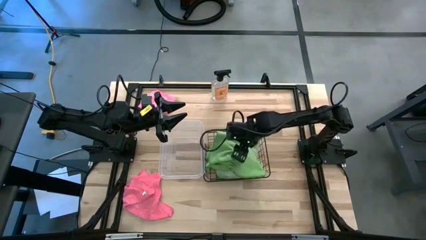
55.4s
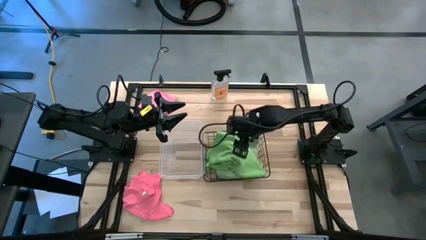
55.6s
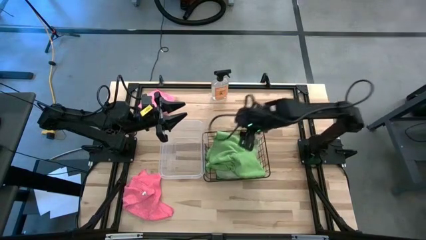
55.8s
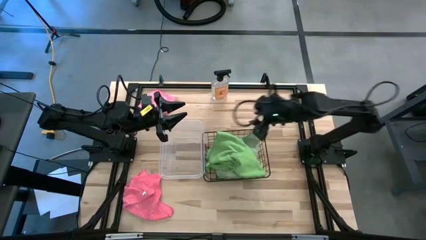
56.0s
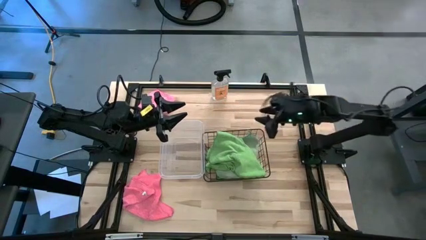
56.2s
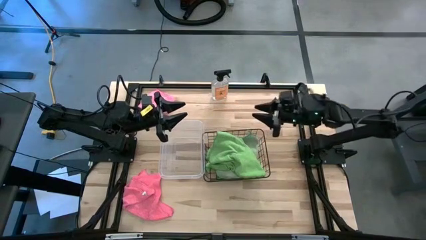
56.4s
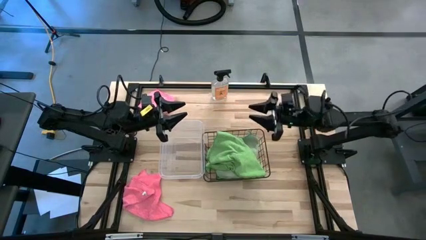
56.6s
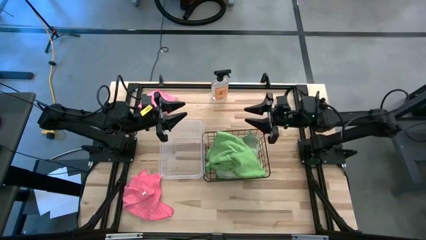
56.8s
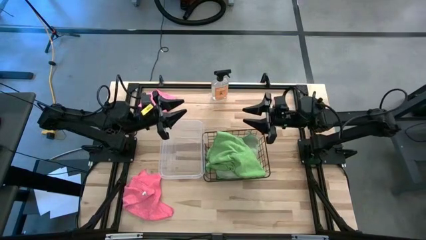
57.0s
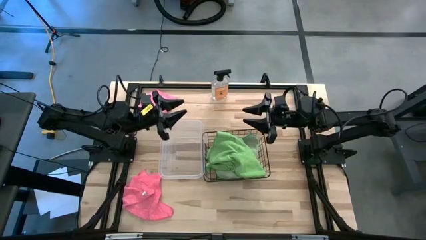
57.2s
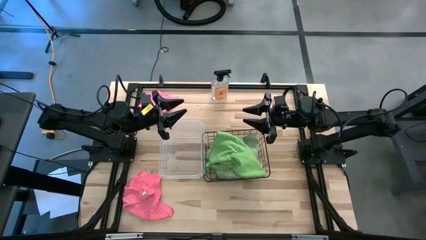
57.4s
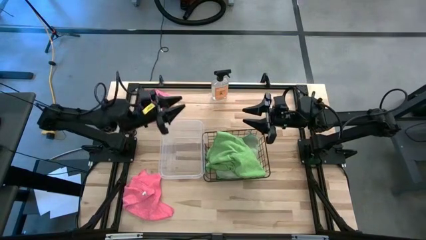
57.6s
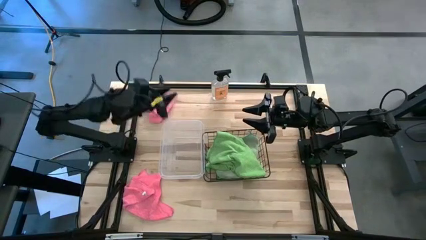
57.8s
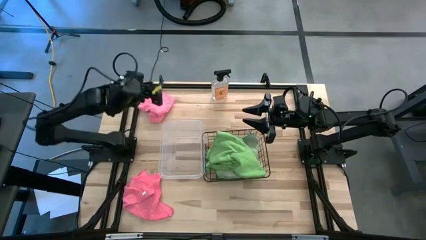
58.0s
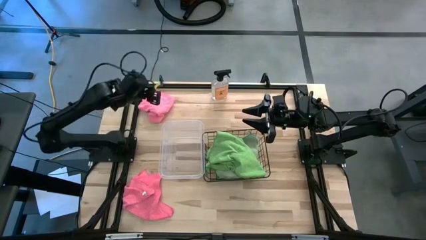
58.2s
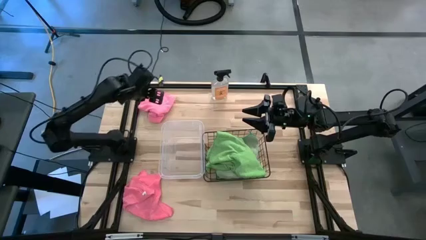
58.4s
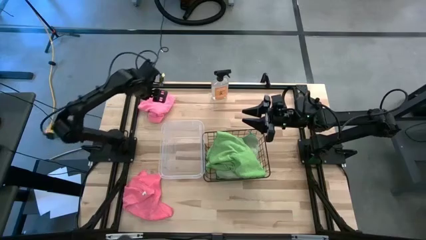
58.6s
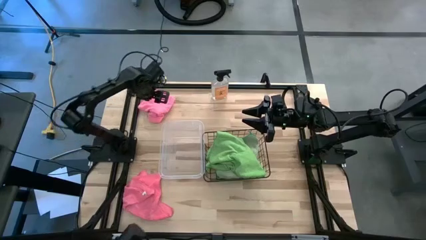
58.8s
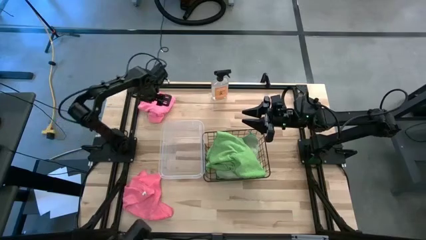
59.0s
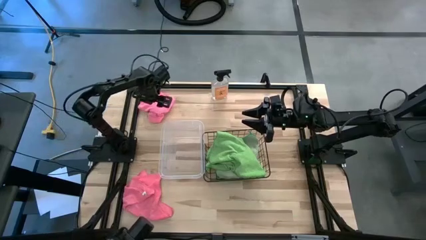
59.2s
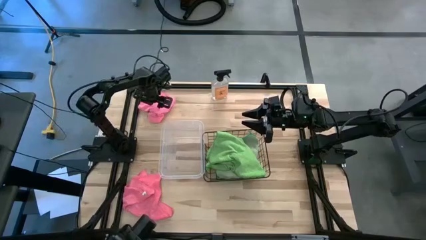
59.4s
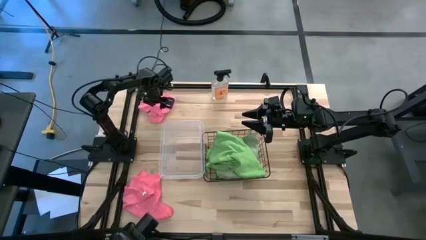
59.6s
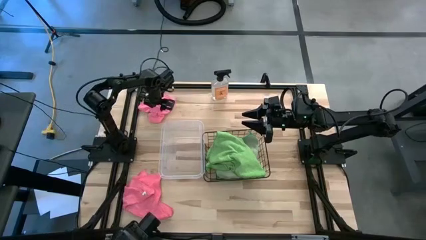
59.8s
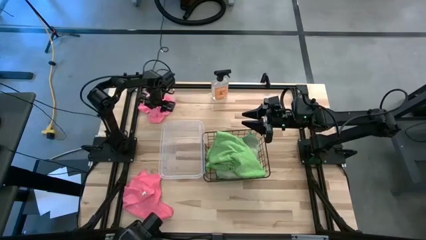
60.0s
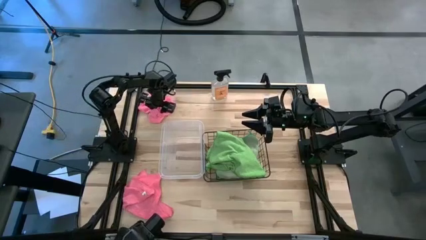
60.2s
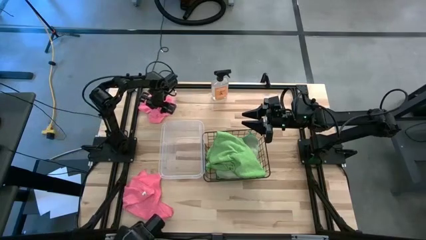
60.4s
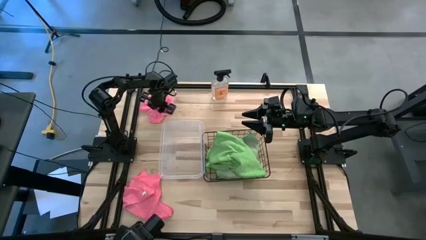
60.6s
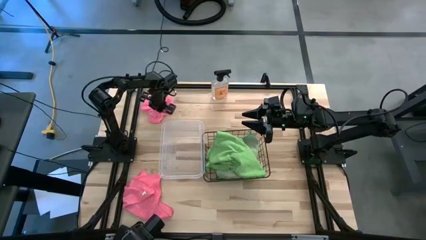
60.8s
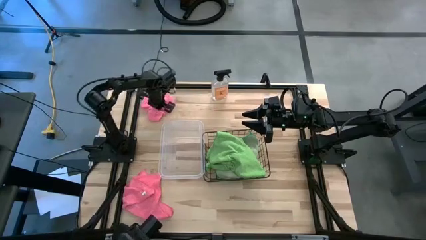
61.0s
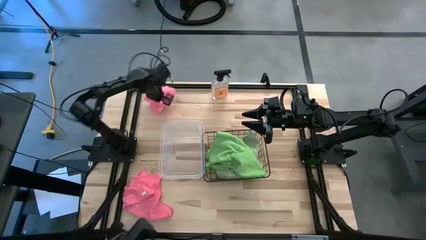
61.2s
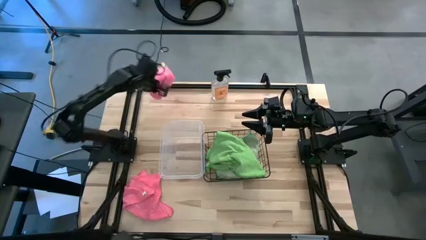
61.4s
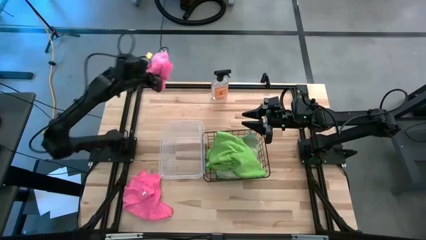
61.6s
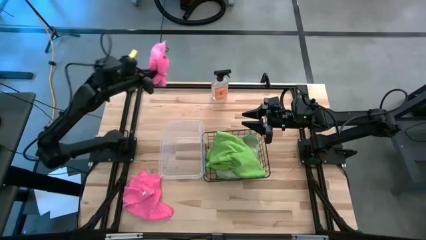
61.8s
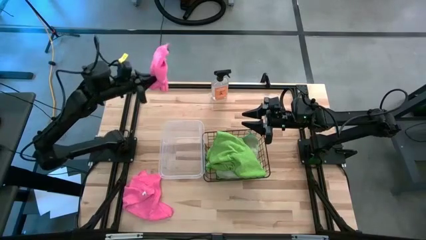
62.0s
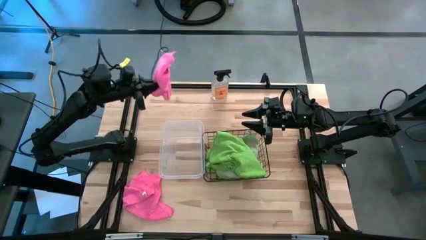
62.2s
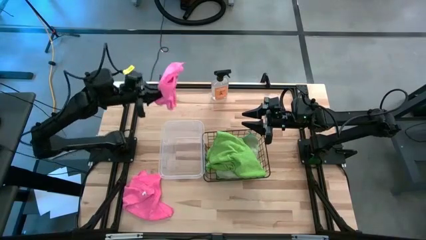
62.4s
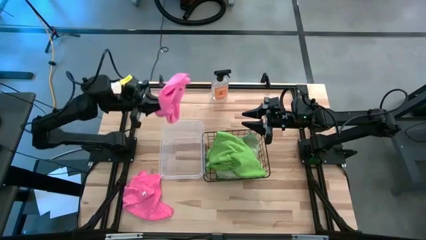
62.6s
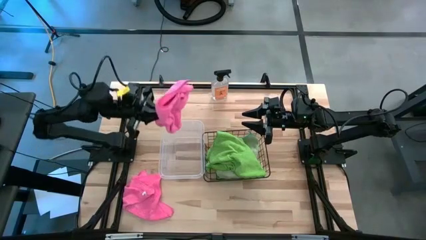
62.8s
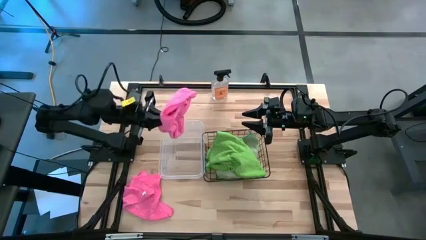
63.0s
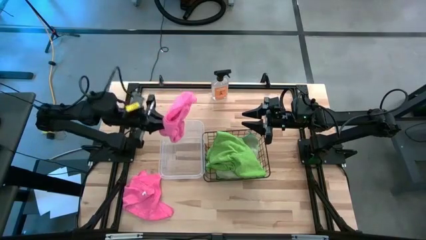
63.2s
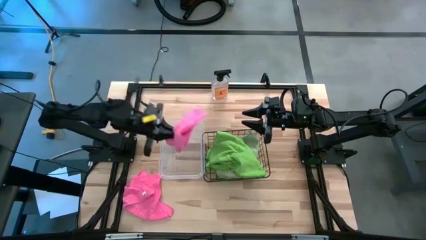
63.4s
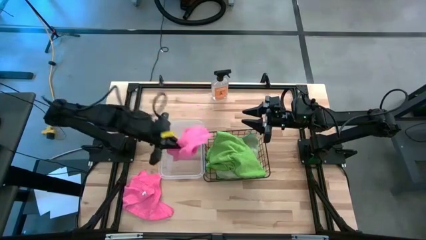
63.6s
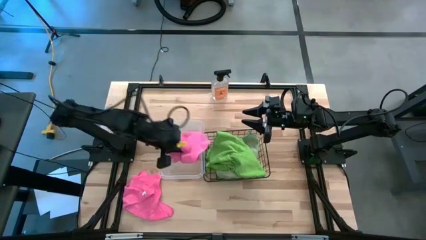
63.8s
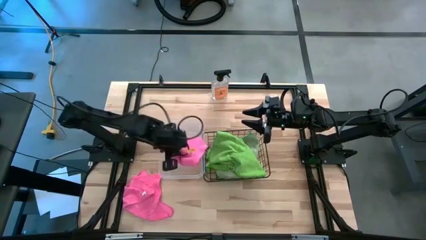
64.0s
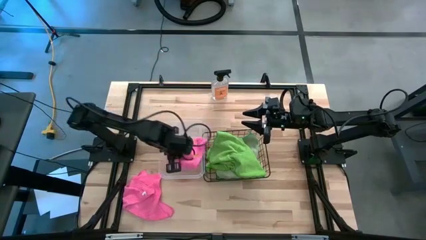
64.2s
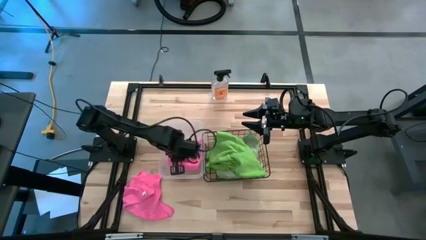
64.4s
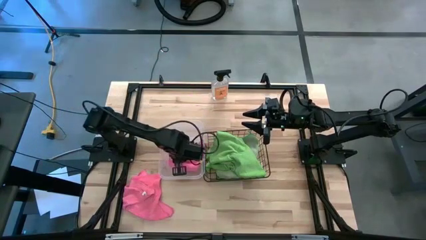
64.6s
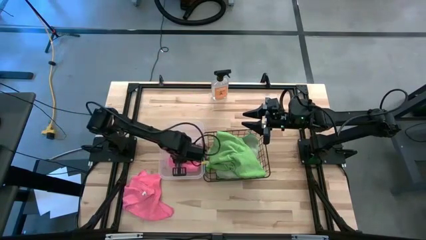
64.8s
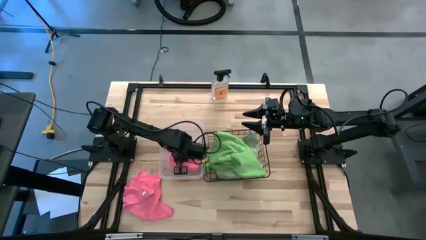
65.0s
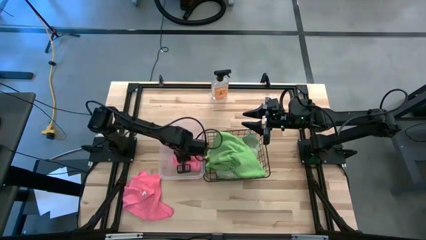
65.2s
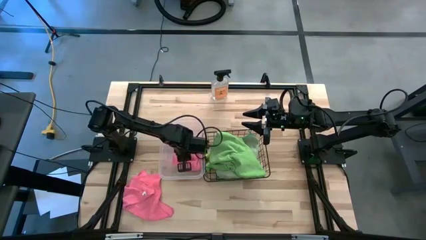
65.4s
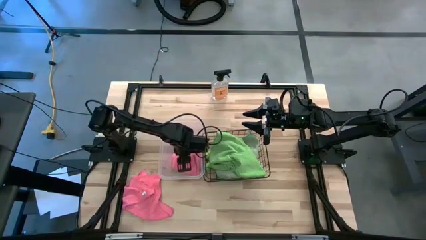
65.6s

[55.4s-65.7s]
Task: Sort microfiber towel by color & place in baskets
Put the pink towel into the transparent bin

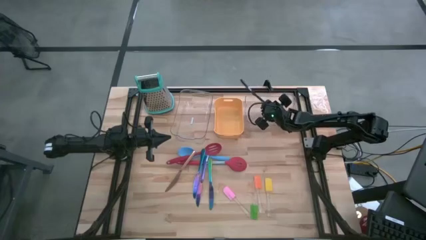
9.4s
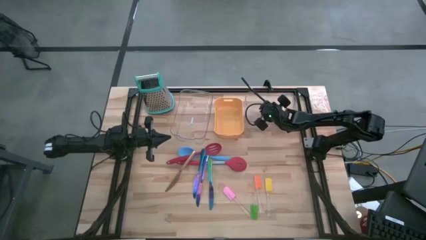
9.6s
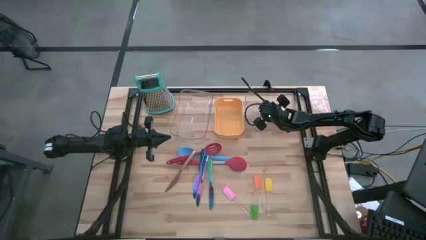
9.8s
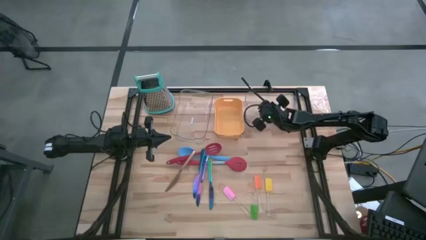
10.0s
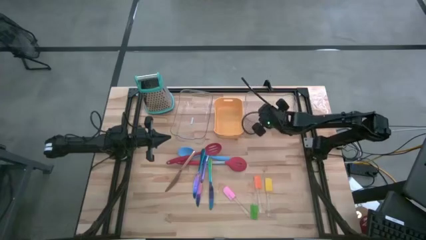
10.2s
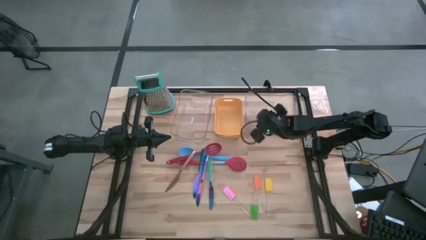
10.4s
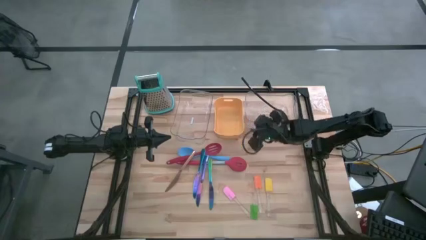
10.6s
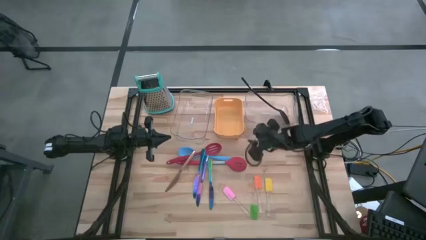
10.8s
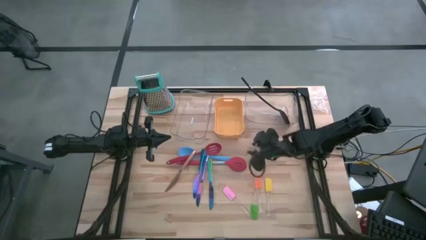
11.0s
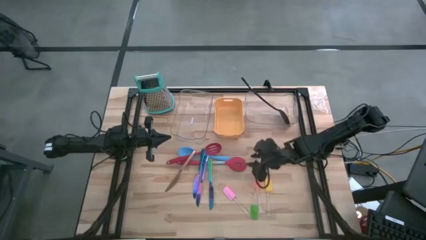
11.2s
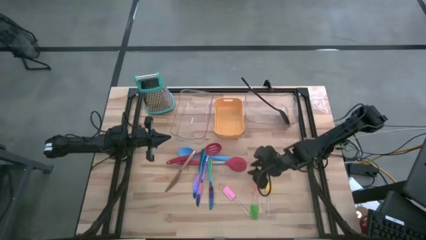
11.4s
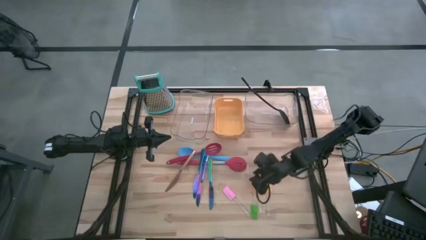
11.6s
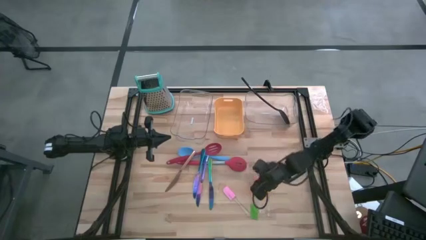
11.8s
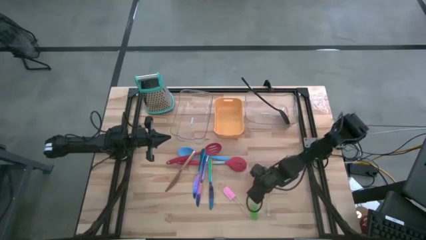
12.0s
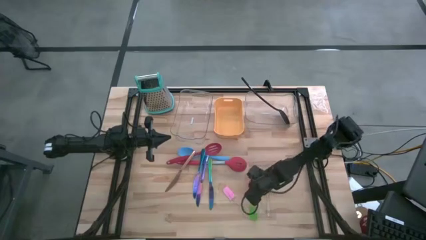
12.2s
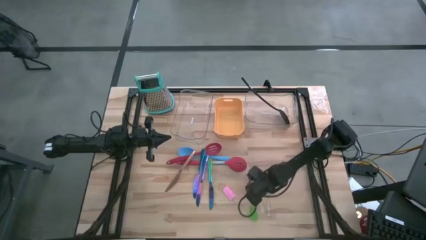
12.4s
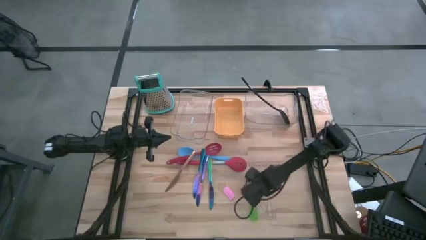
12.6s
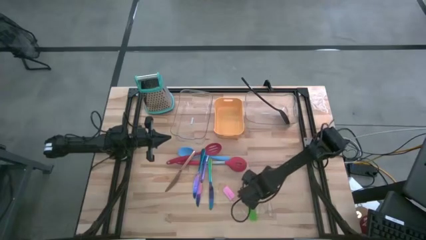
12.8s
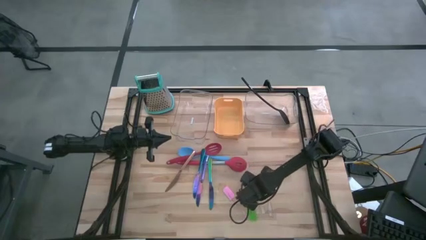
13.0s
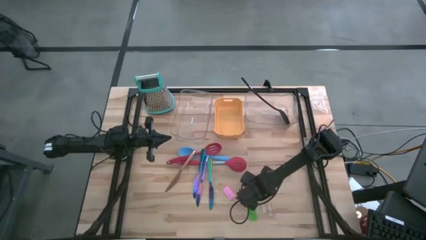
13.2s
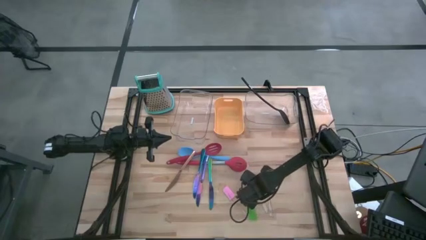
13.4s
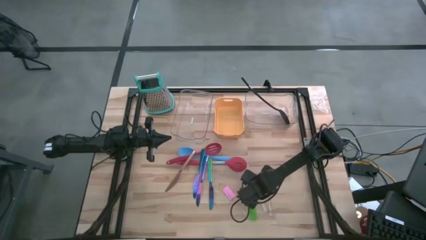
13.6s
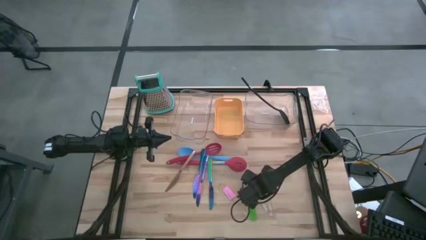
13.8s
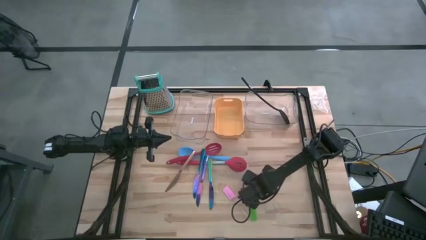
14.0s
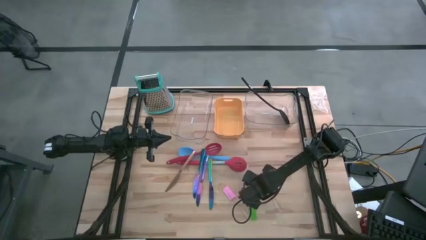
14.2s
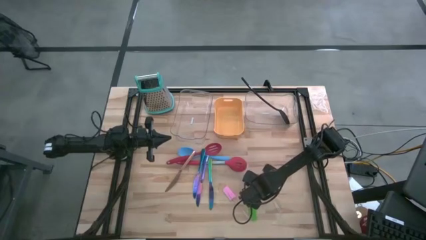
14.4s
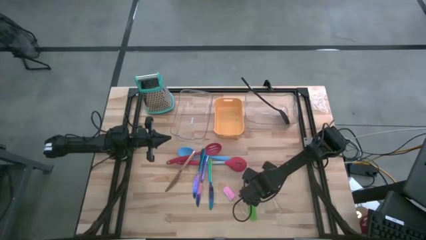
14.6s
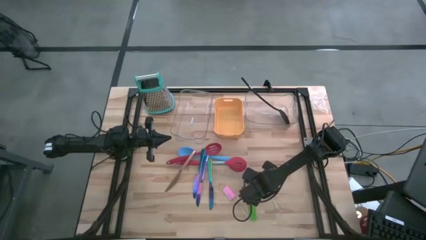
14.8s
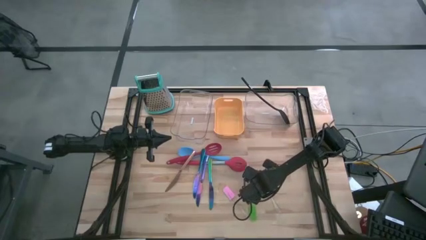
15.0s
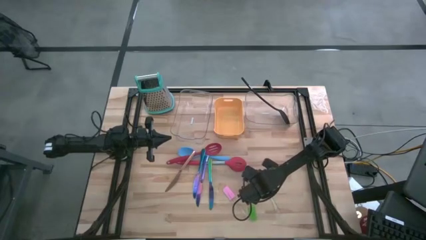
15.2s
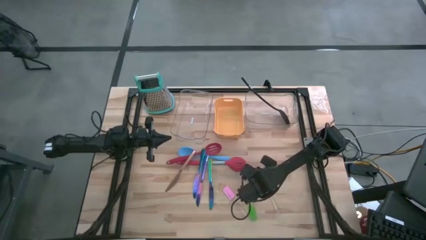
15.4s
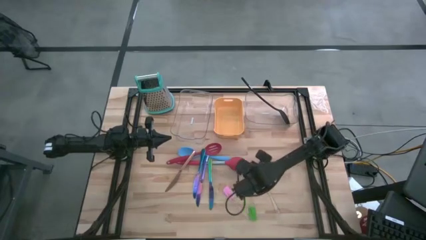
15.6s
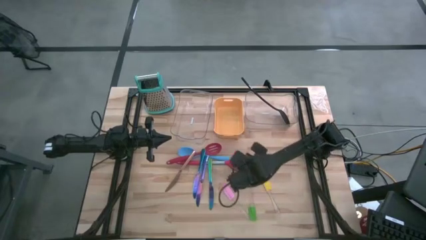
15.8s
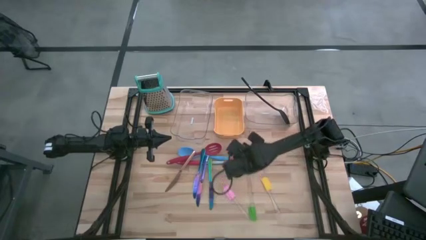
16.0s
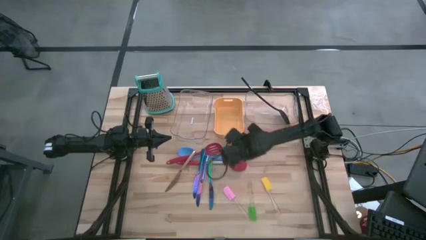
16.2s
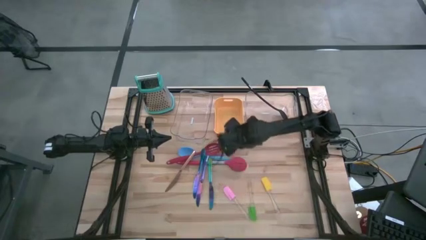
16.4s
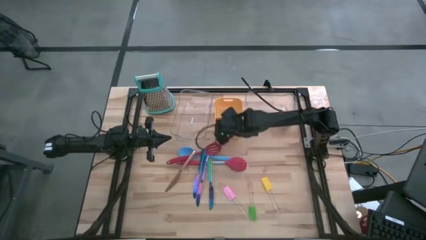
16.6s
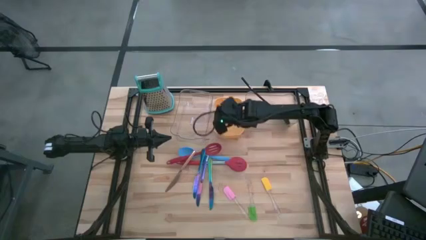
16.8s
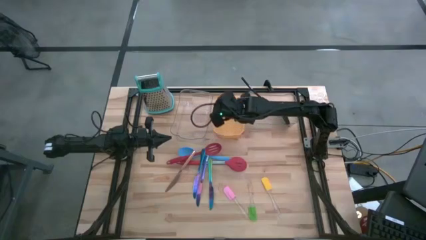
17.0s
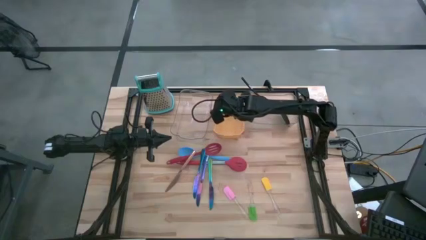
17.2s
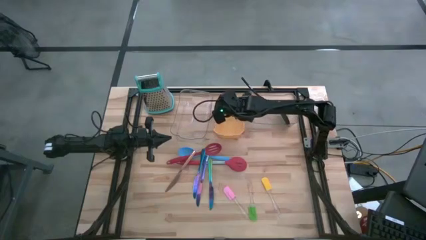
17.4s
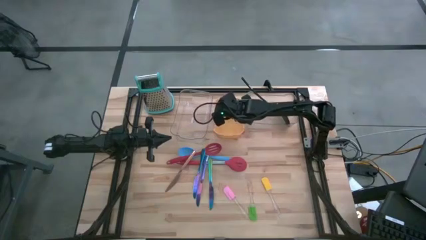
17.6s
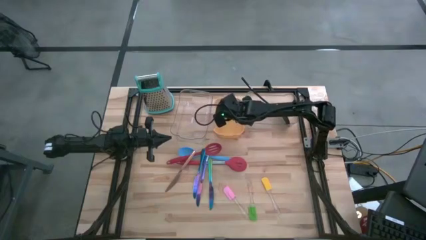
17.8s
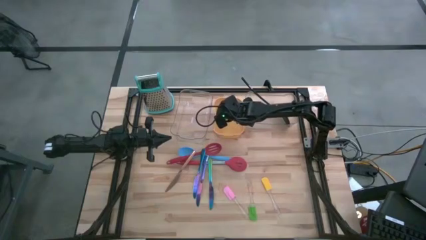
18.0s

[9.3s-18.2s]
Task: Pick & Place Kitchen Items
Put the orange spatula into the orange bin
